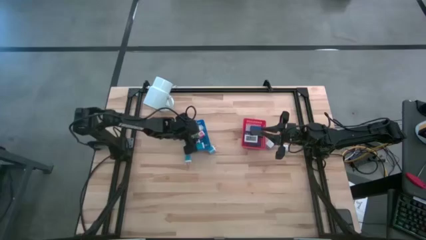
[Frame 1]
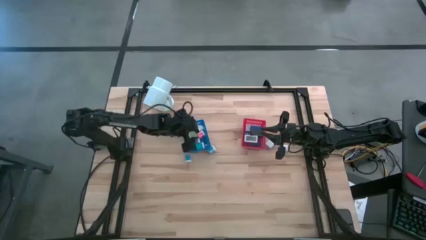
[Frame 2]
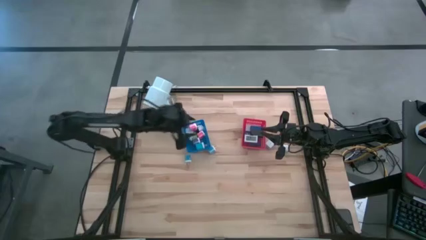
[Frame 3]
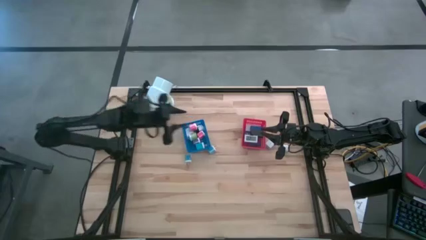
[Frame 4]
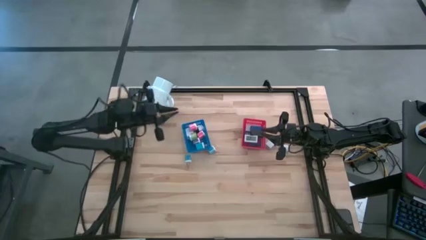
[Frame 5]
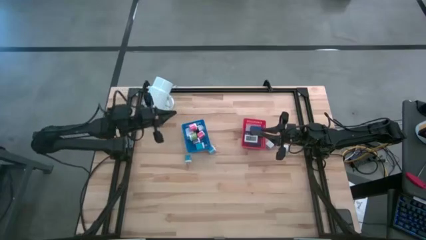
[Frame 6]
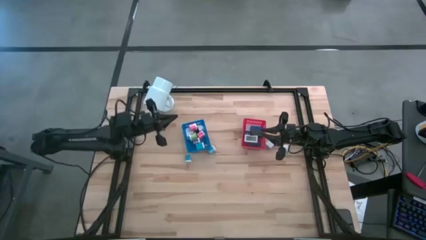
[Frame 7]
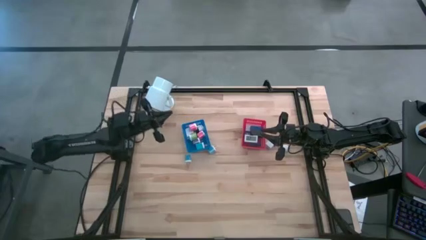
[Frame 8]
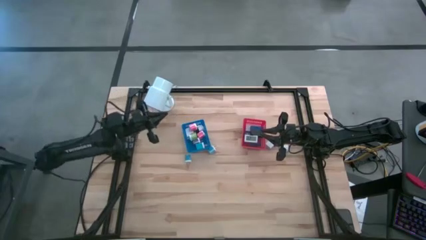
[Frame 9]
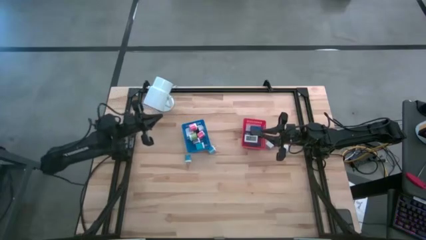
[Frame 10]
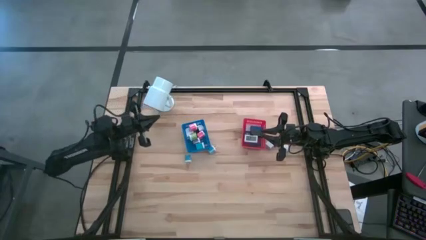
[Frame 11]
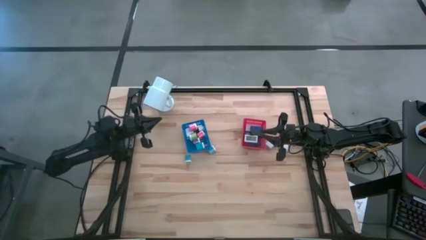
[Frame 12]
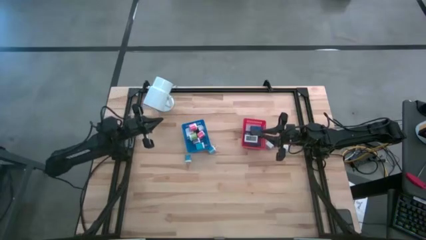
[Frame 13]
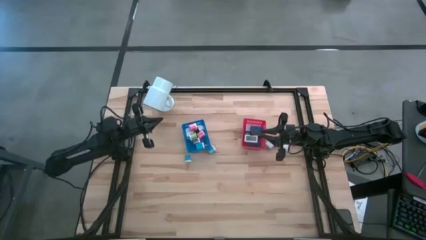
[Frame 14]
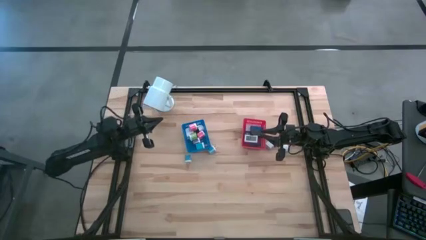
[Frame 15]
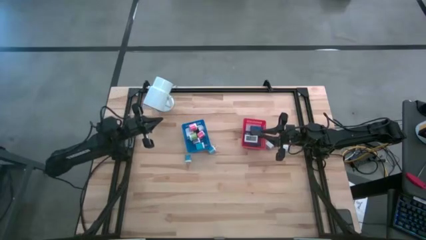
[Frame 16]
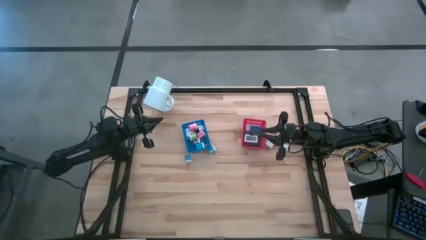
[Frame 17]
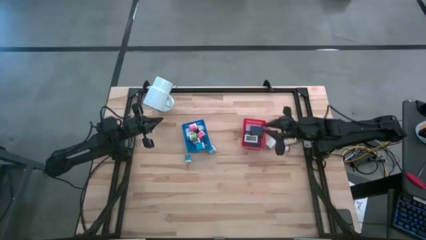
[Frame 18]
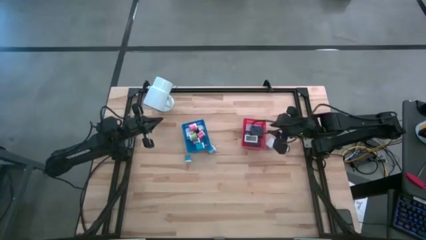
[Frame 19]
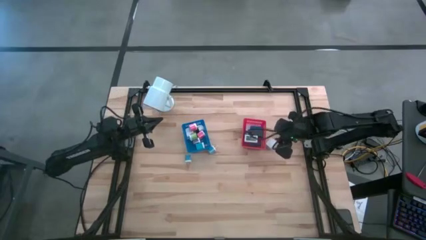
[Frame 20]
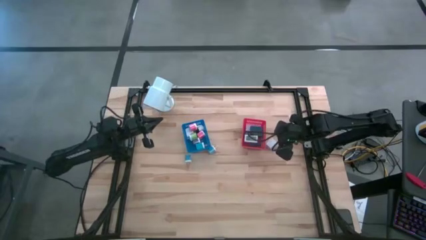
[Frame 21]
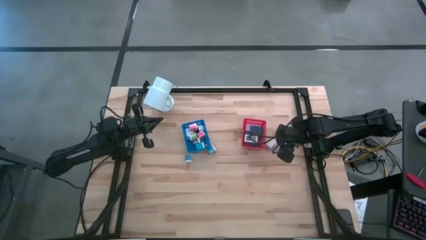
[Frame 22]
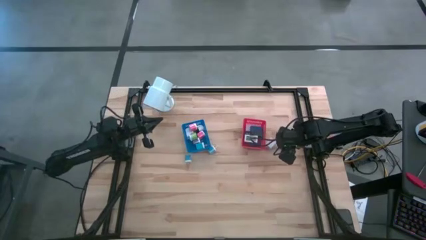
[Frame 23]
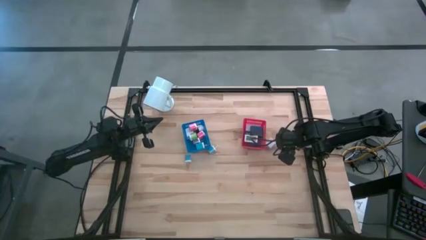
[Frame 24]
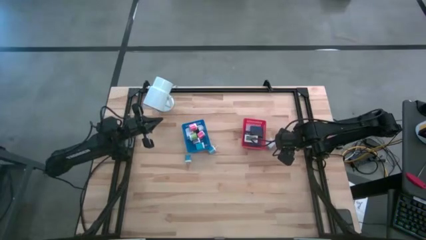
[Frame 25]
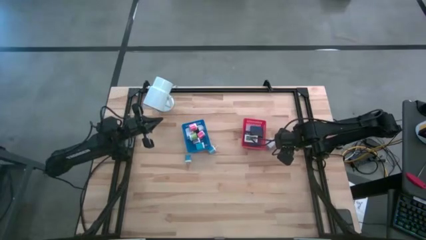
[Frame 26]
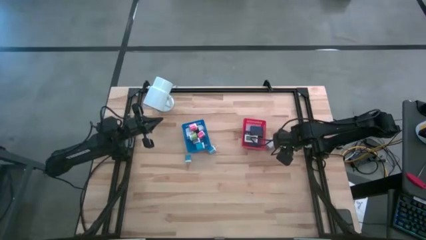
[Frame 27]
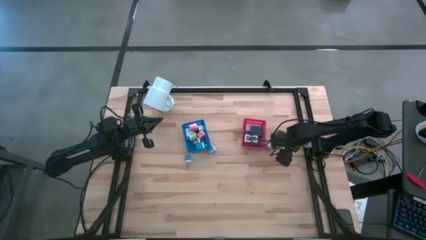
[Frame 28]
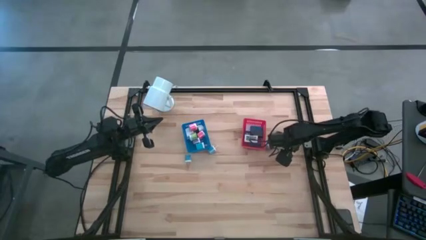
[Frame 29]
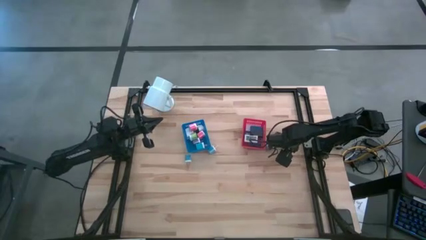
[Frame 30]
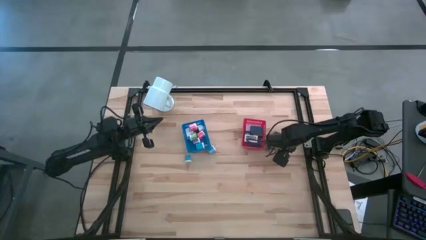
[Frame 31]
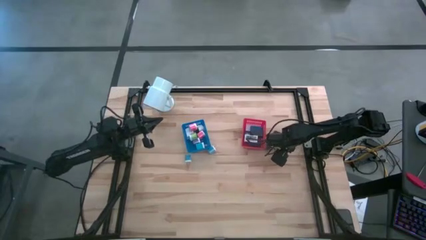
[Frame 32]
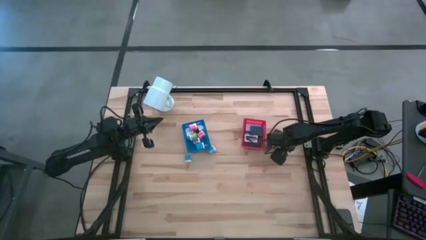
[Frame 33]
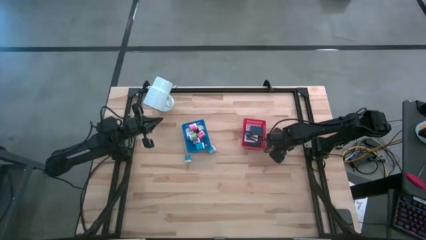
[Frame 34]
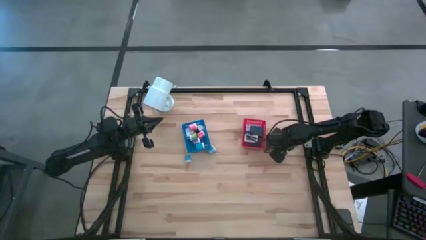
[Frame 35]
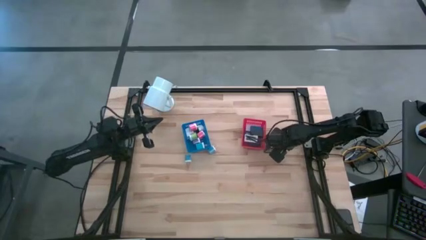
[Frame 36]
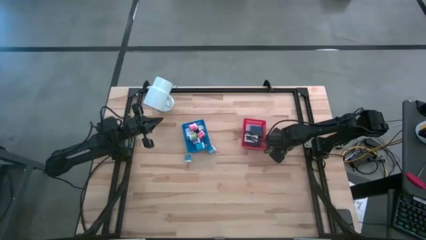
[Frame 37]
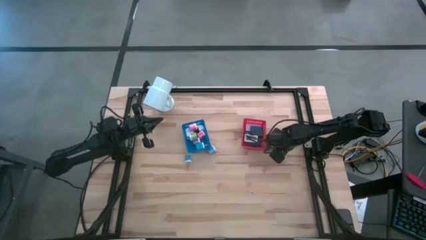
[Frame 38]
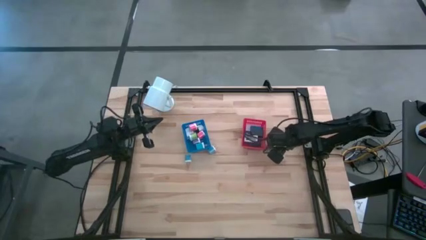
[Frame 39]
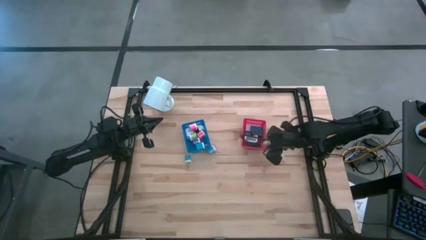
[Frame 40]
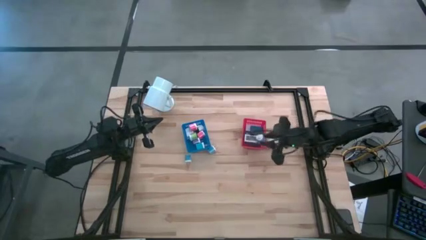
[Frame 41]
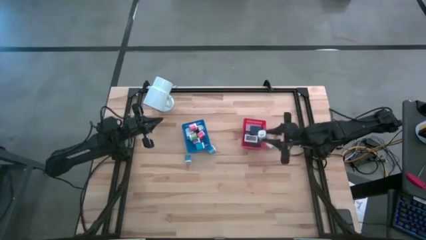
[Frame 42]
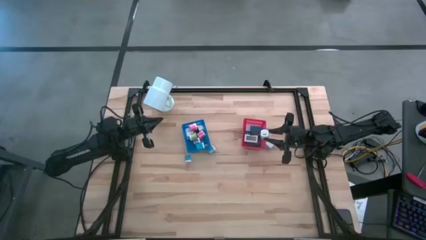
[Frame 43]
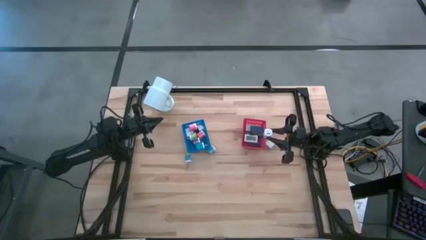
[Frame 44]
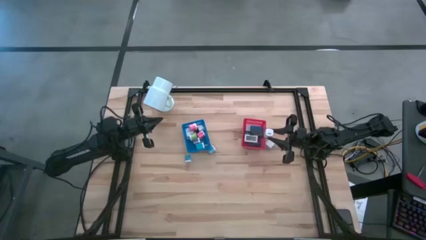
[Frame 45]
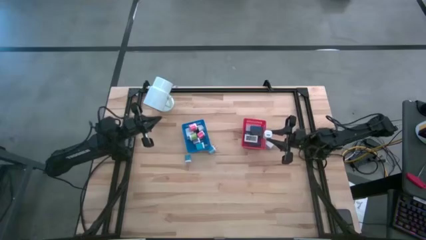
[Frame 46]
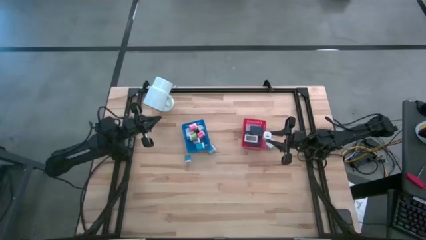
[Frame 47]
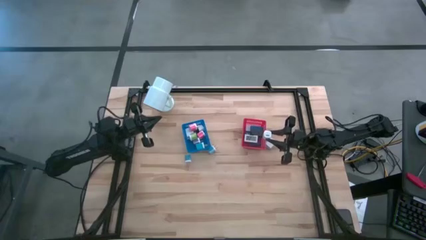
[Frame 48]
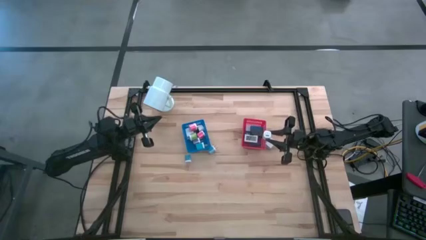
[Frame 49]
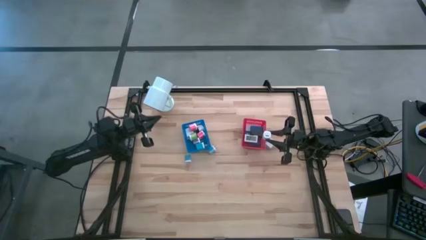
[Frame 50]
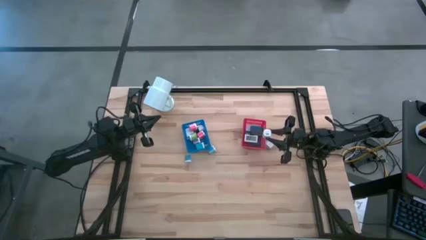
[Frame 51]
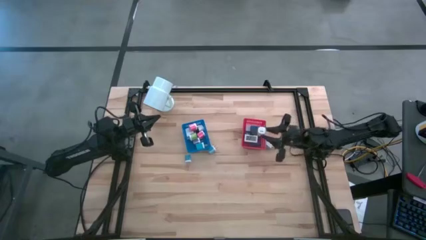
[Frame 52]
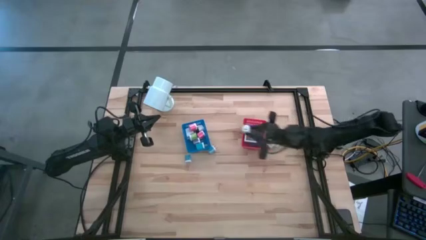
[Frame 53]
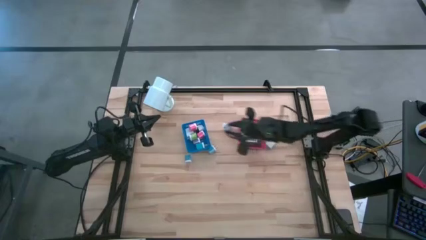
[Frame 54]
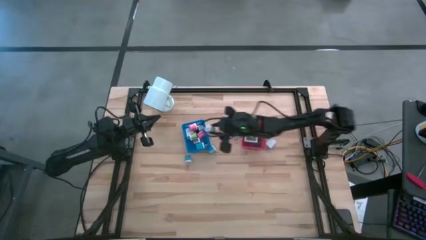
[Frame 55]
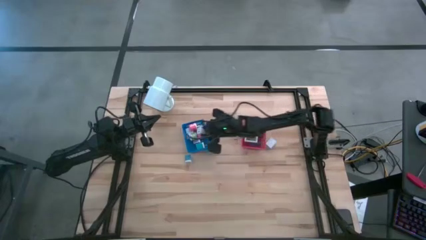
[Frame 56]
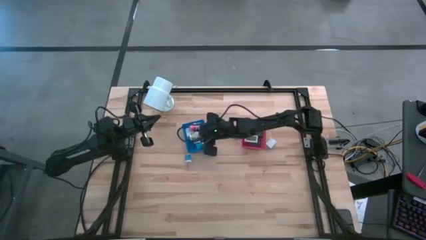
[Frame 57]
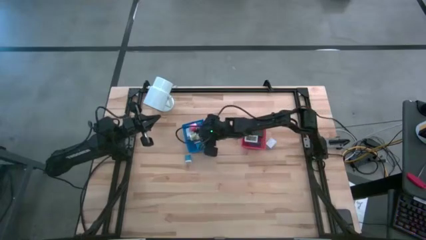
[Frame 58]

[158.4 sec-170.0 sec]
Task: Pick & Place Office items
Put the black and white charger adapter into the blue bin

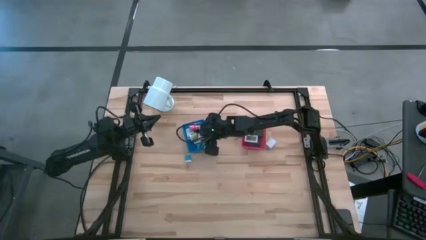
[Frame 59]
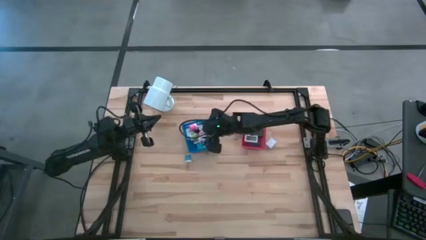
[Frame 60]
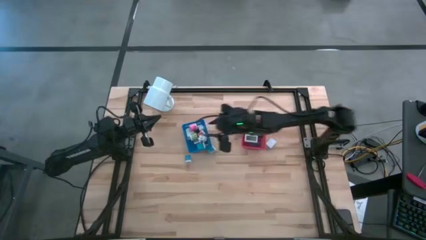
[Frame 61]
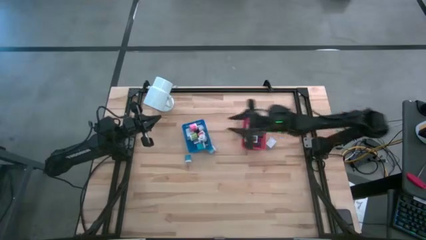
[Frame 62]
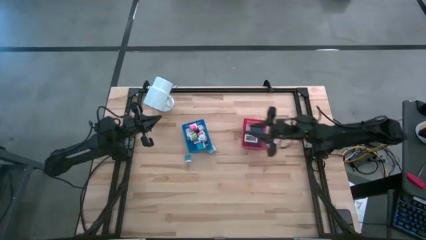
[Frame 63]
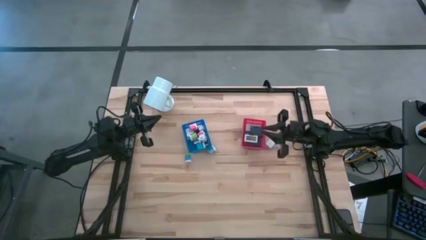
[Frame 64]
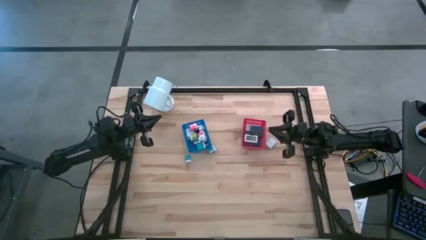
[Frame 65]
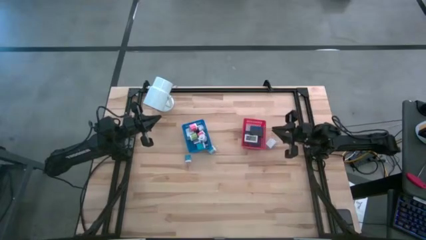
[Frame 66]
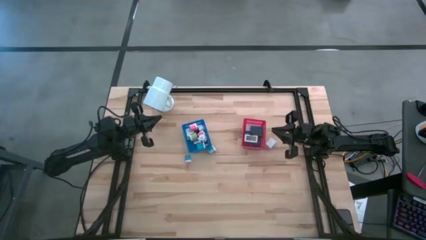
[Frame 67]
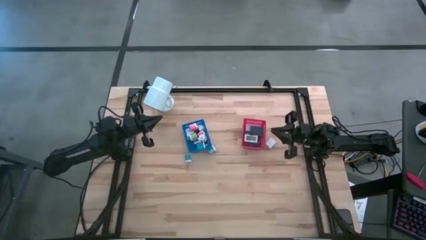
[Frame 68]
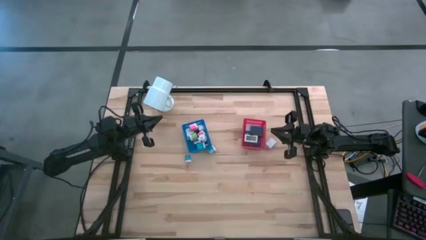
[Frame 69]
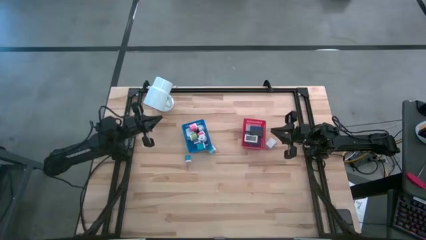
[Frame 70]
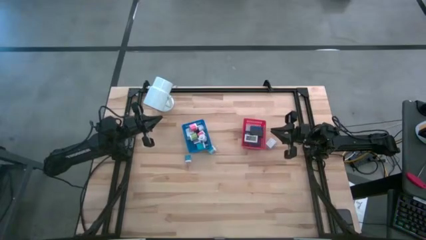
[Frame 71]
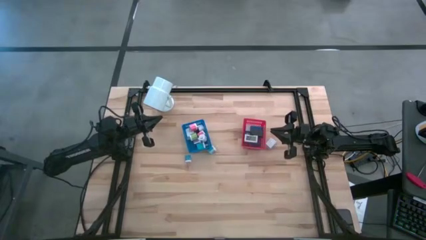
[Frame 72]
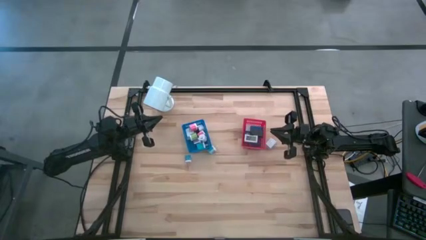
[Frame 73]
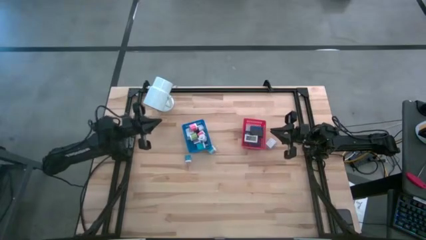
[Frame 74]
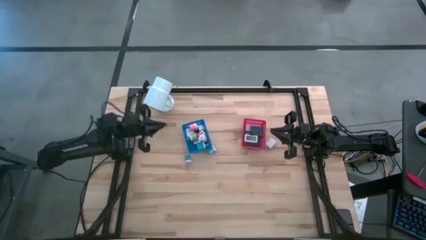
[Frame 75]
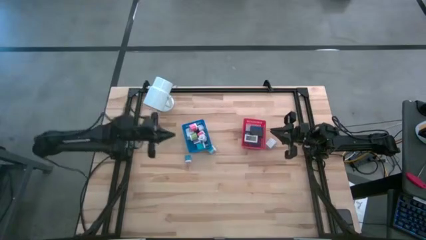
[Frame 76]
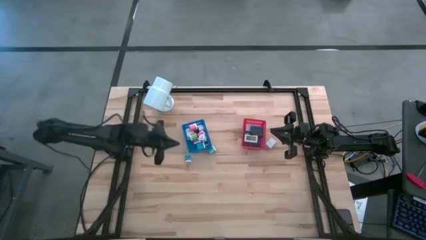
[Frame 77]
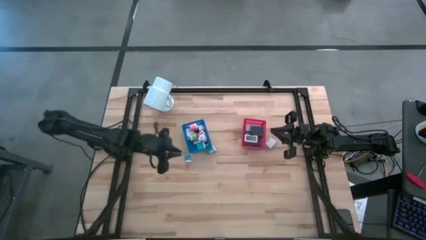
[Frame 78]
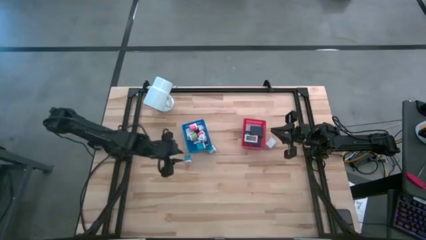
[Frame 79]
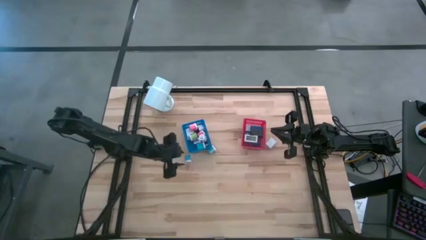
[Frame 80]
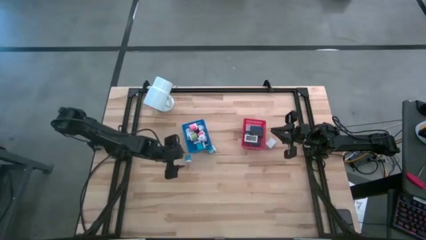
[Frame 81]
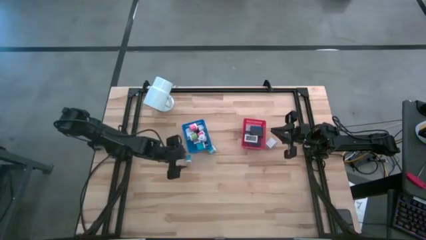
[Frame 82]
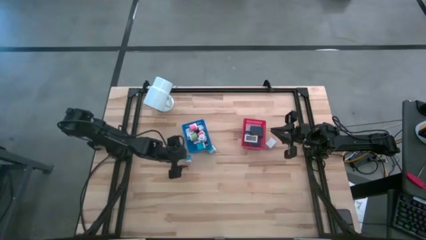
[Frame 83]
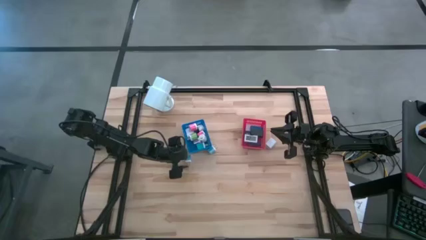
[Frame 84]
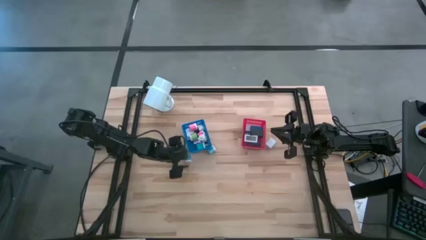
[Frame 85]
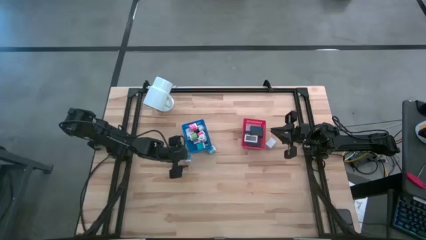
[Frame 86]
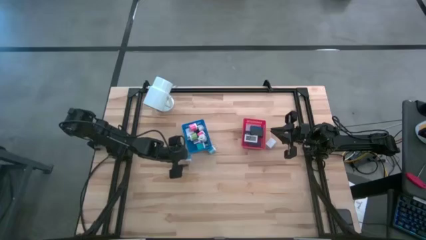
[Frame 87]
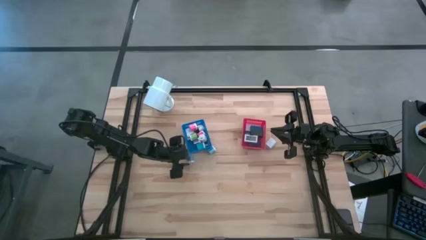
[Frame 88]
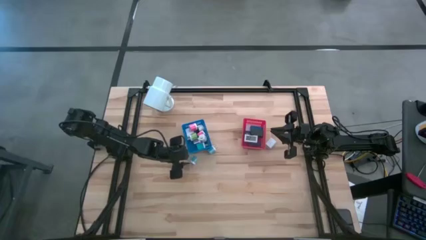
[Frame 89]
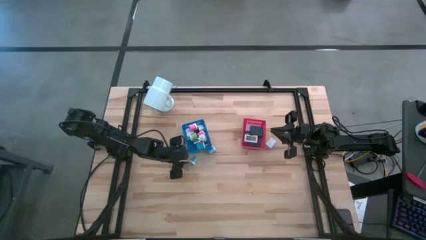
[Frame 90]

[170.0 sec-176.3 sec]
Put the bottom blue charger adapter into the blue bin
